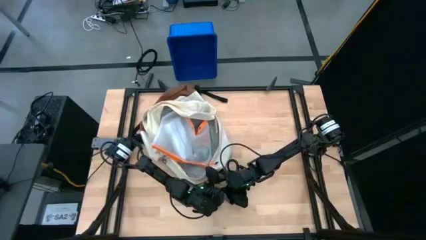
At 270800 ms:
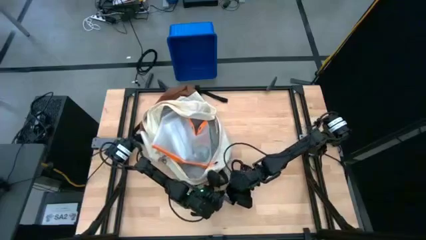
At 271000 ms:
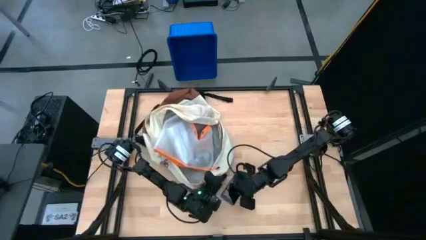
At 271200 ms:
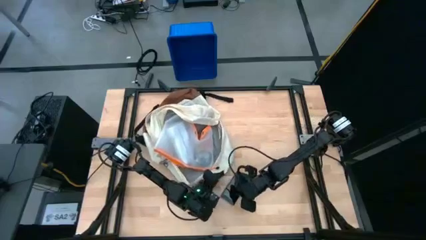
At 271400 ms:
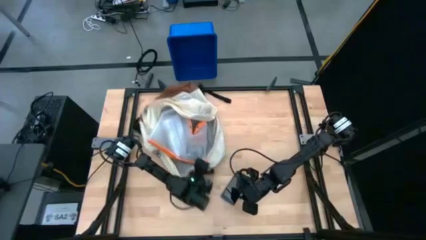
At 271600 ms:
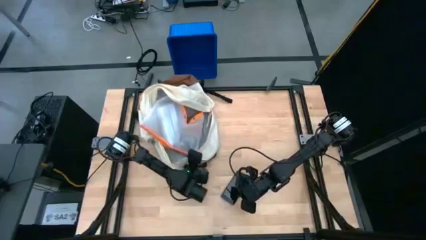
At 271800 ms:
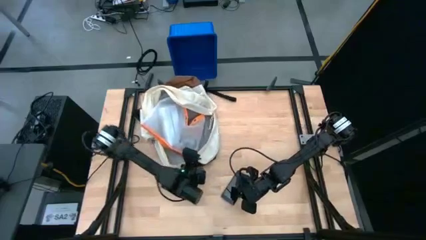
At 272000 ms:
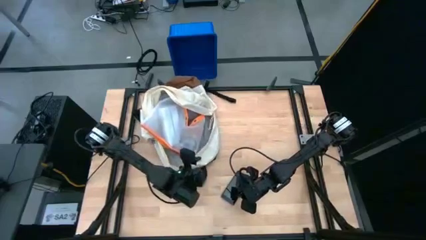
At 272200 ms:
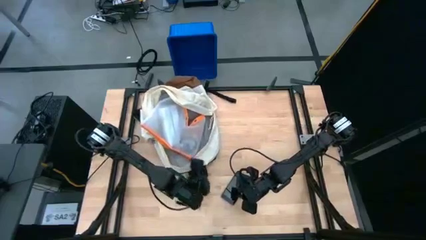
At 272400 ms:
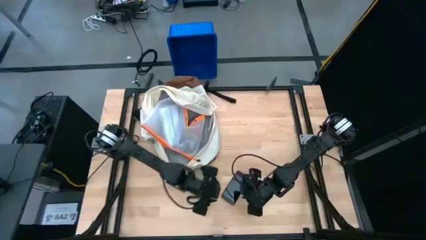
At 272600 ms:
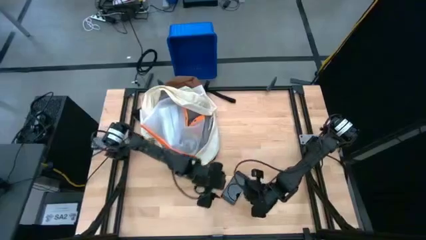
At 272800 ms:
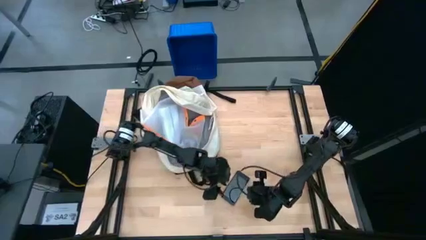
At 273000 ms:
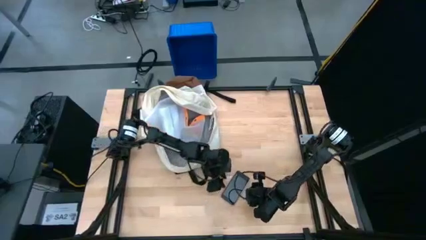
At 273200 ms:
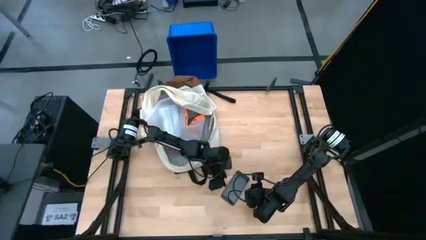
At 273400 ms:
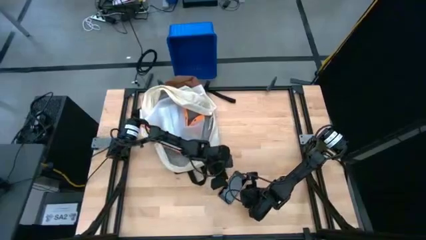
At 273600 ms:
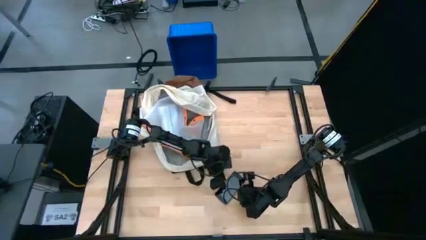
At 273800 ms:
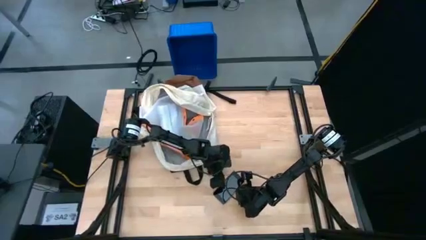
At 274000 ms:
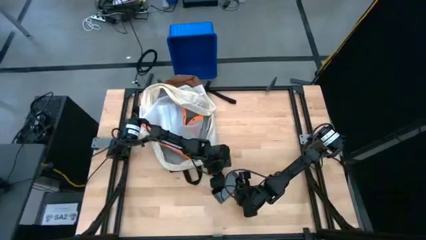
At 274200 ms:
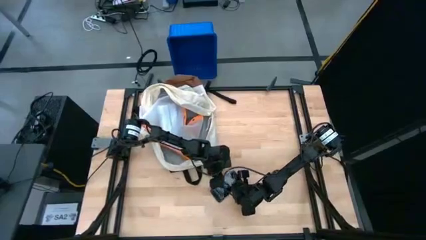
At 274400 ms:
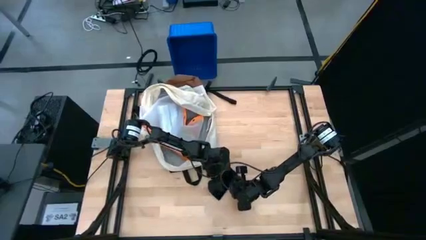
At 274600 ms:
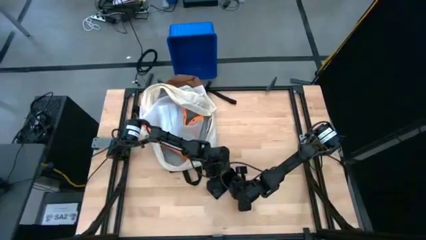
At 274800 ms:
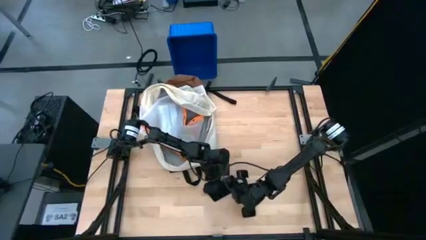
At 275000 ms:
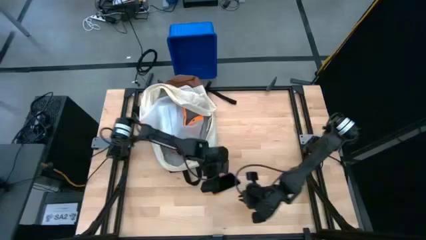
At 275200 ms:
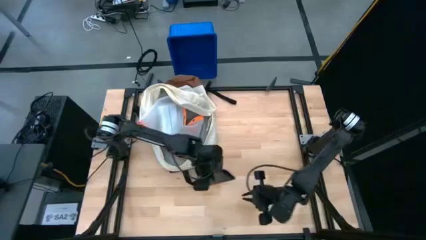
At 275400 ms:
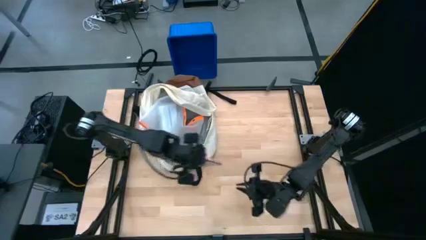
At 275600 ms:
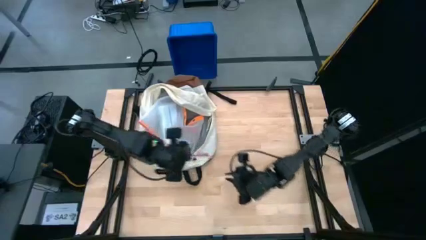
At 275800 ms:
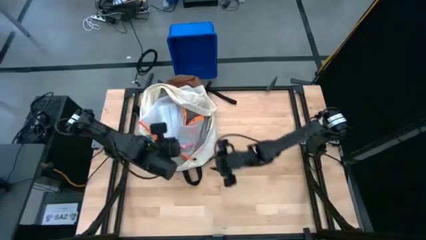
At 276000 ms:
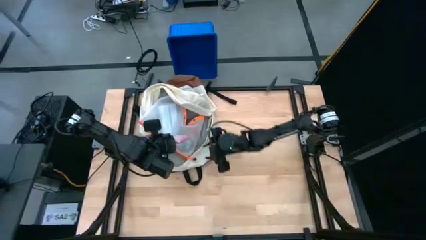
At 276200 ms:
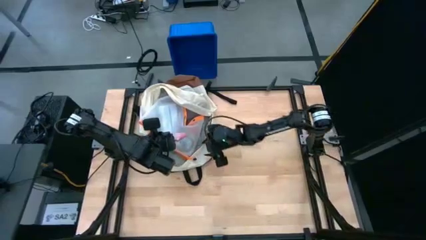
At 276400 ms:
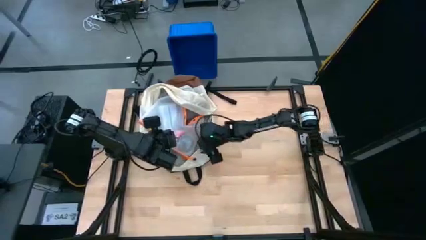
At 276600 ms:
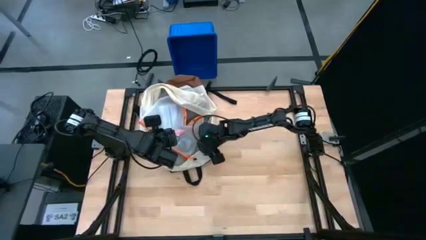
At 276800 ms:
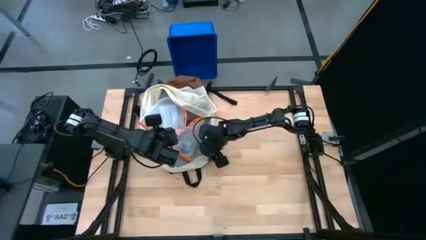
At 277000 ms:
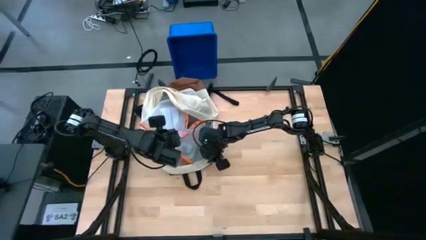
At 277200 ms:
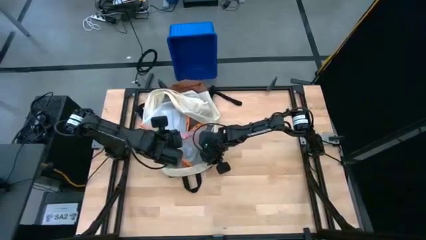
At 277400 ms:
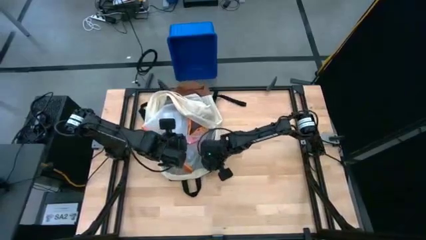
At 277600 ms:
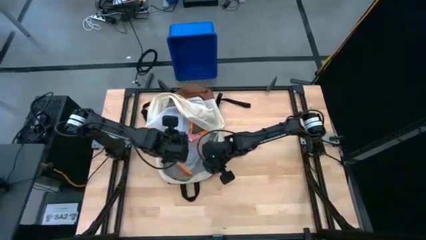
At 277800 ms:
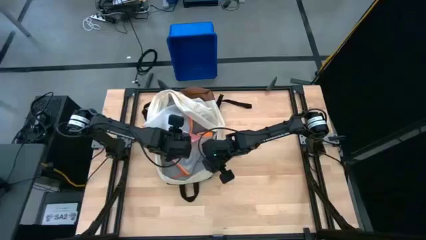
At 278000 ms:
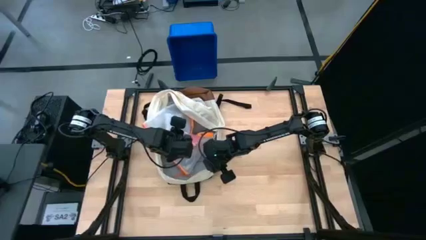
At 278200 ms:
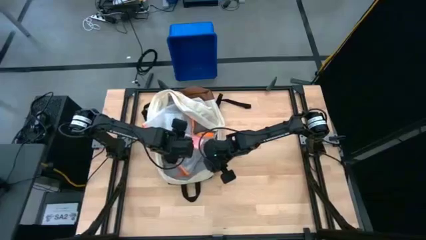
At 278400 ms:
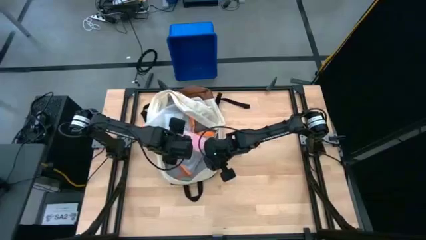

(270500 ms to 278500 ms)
Task: Unpack backpack
Put the pink cellphone into the white backpack

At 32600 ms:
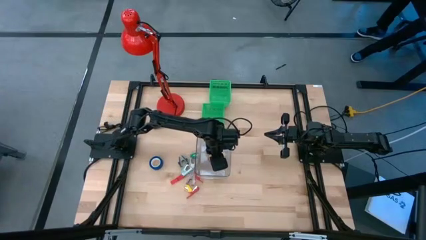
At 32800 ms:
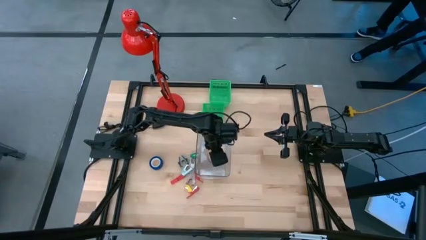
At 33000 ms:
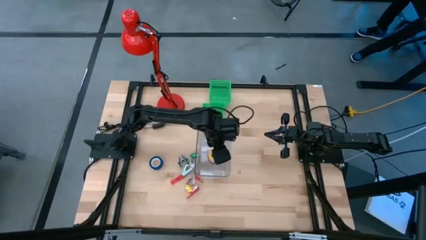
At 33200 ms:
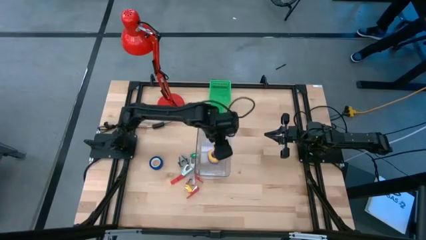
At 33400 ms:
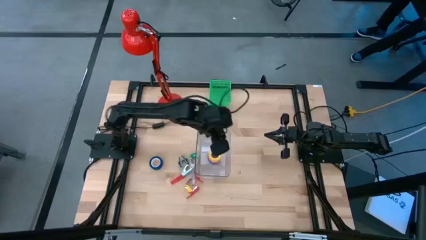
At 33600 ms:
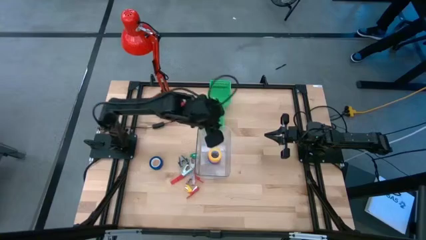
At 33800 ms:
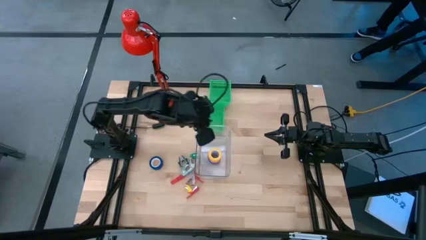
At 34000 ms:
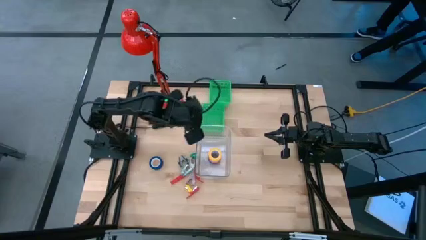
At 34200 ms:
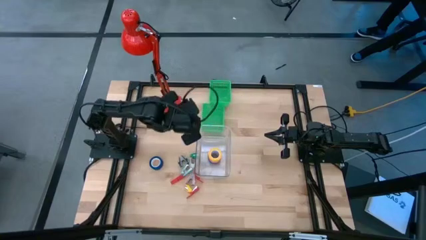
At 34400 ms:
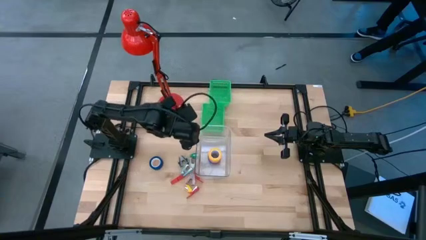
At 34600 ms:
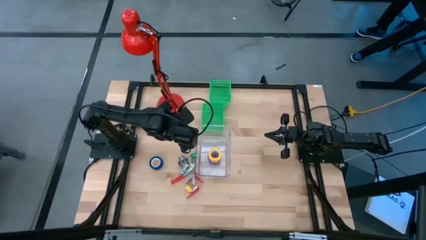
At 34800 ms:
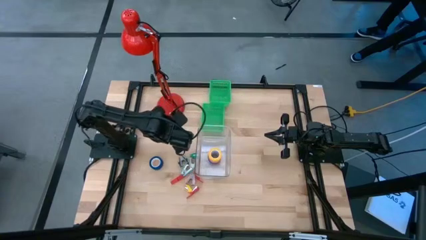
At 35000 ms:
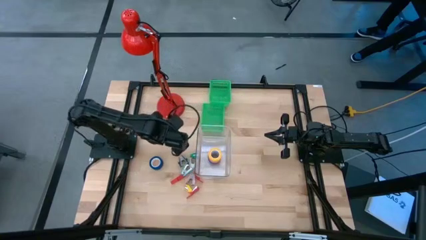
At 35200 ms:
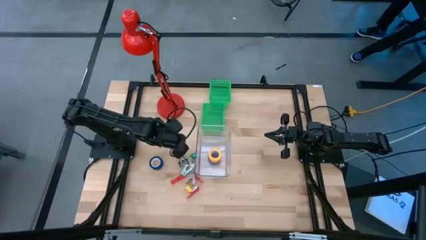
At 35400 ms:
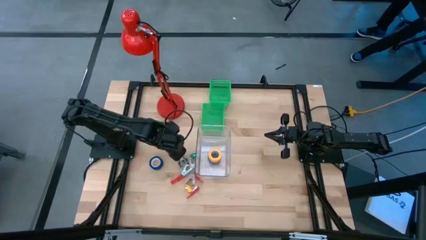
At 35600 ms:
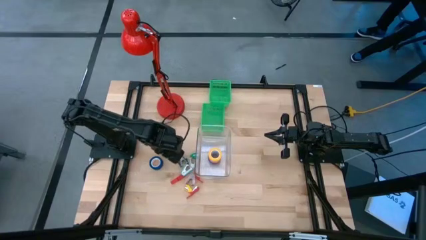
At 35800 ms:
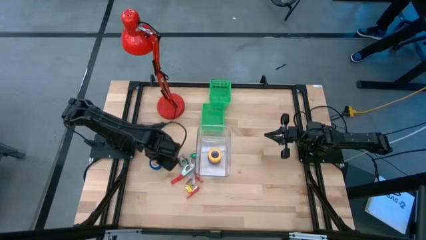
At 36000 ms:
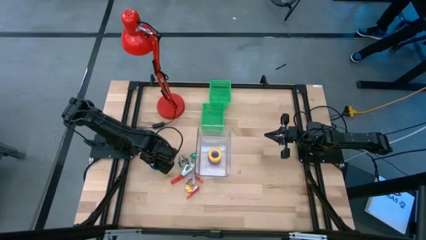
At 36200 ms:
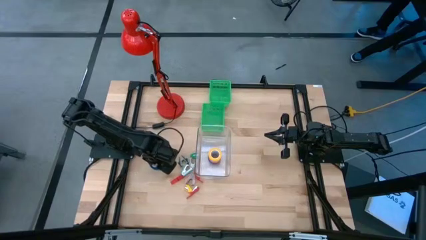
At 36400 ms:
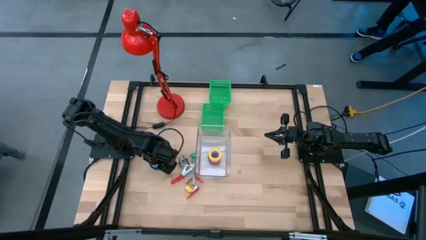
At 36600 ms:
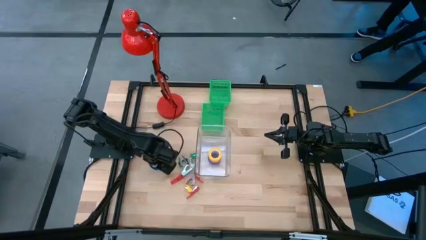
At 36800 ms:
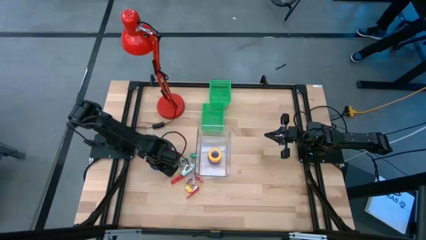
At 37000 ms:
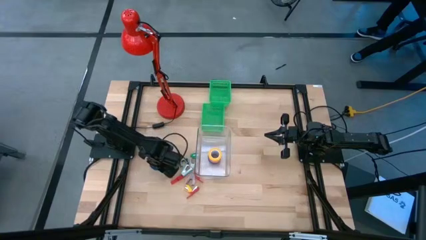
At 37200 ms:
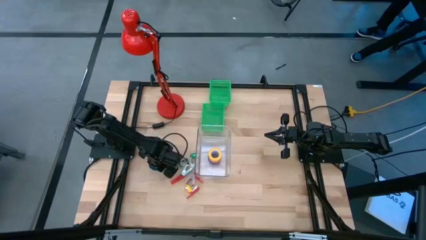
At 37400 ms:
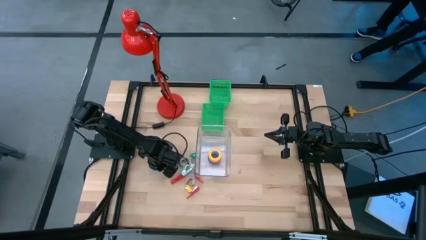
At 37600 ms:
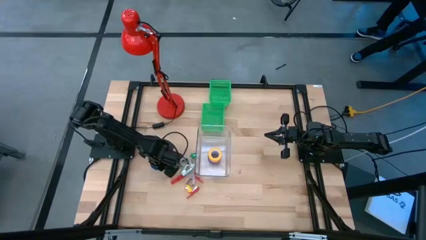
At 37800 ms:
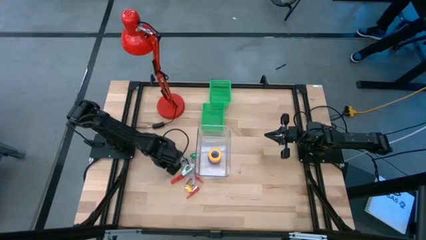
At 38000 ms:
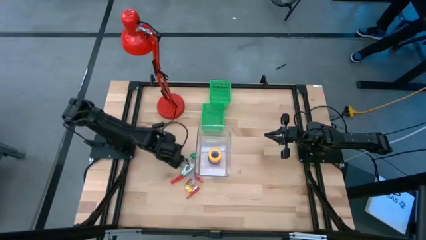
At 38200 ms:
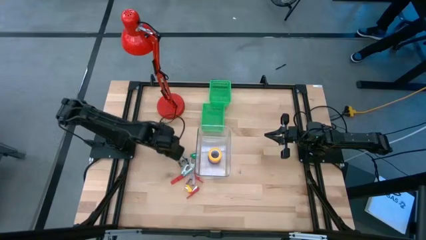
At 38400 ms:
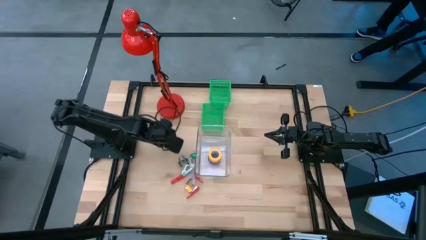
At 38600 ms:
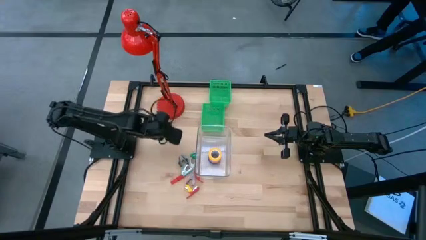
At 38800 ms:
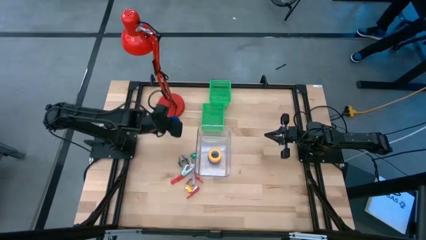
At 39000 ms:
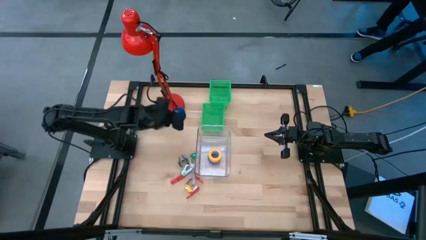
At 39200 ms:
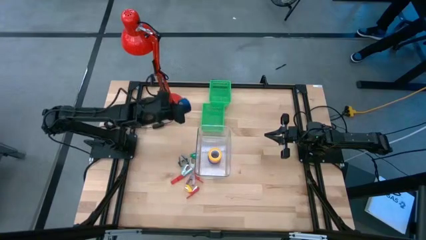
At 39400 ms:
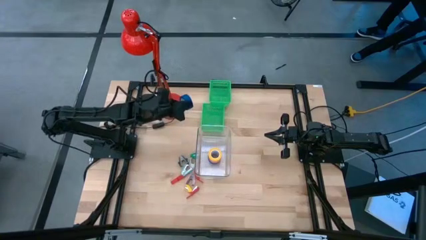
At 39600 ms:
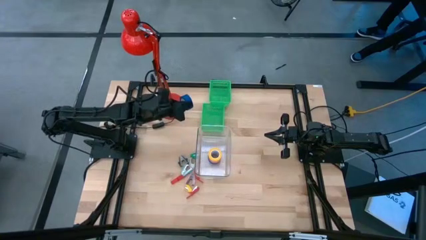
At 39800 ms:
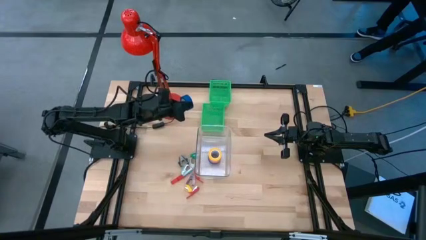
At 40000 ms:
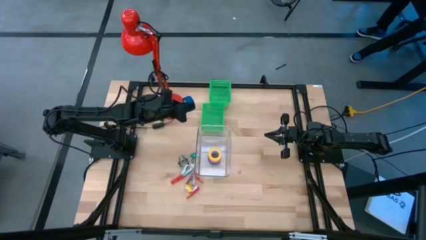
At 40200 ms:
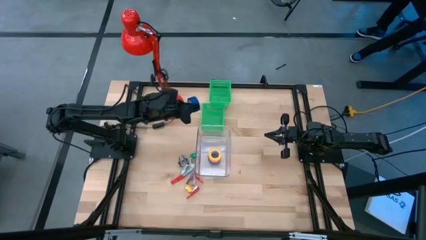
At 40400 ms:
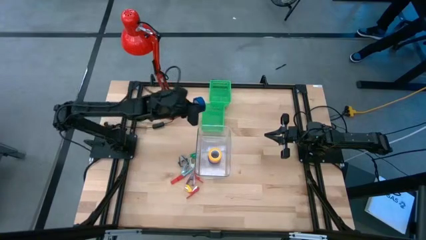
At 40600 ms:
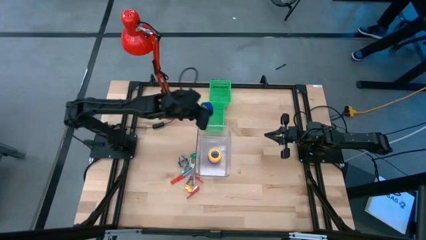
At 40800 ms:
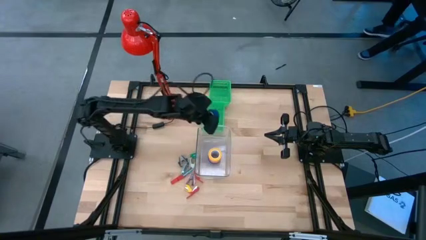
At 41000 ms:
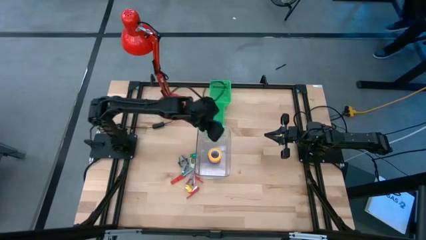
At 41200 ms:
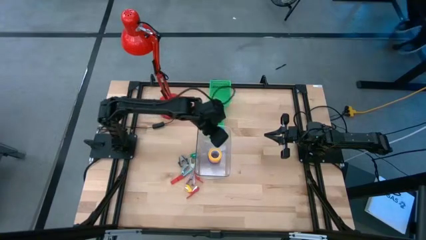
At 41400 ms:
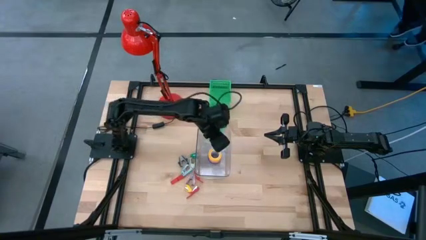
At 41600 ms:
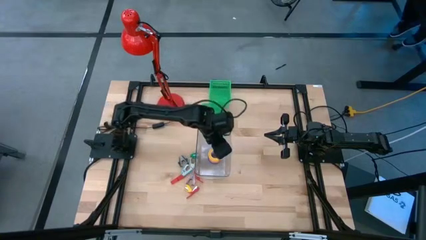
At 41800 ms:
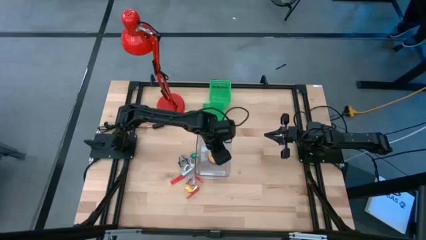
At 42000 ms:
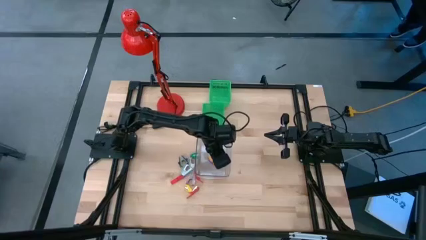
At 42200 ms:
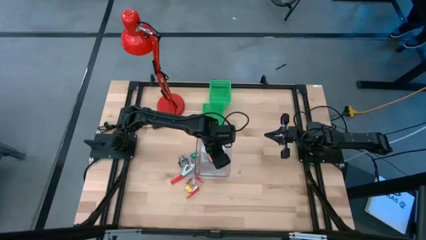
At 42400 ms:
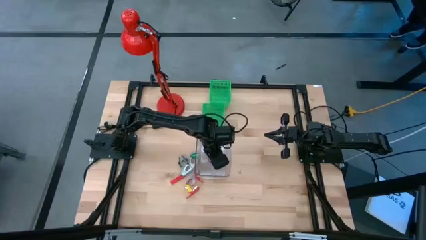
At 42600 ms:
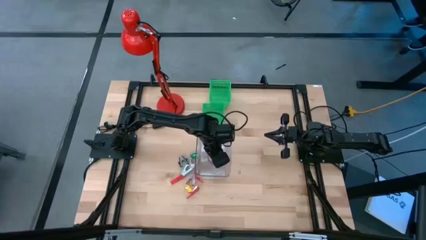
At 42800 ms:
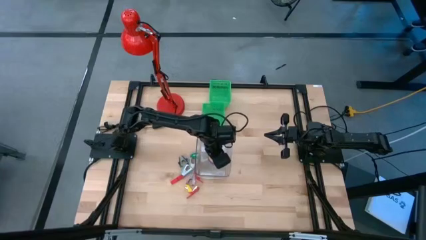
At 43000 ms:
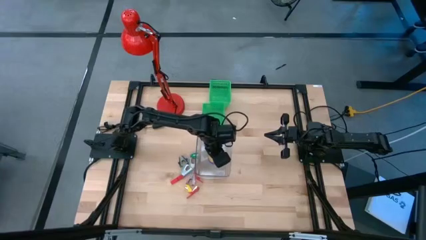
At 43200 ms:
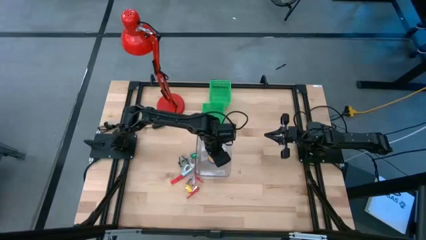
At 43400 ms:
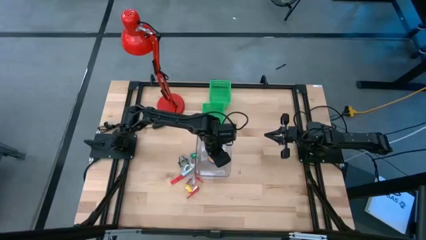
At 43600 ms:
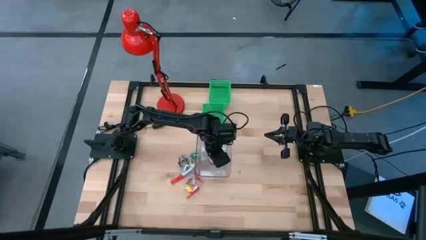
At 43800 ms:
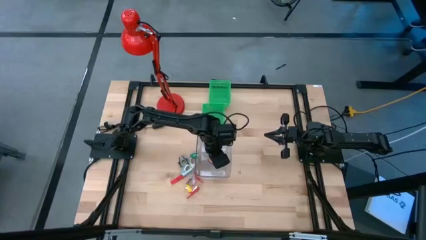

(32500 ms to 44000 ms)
Task: Pick and place Stapler, Stapler remover, tape
Put the blue tape into the transparent bin
